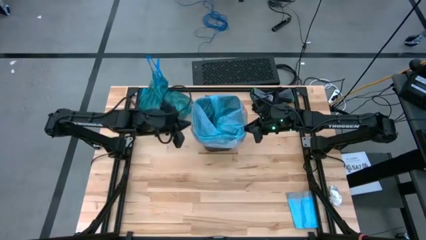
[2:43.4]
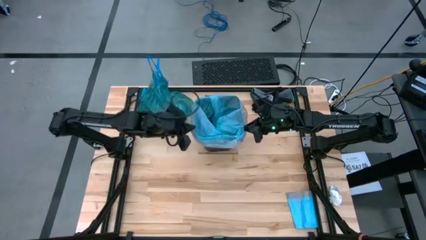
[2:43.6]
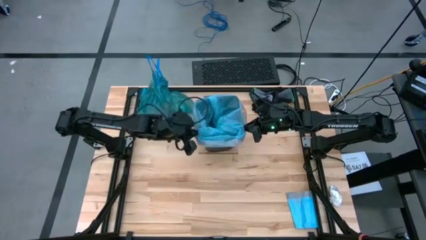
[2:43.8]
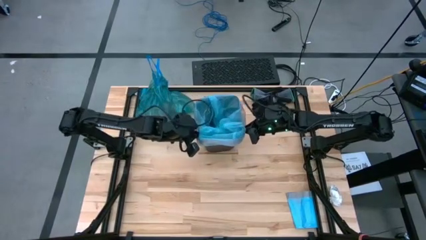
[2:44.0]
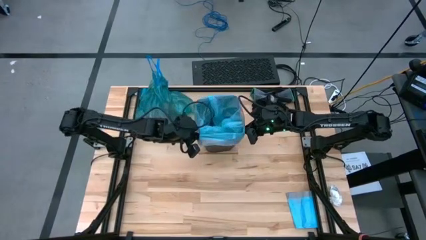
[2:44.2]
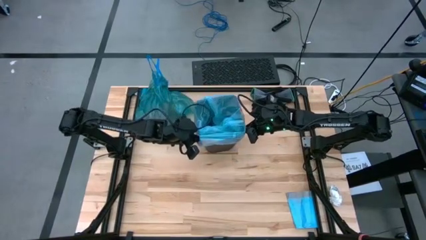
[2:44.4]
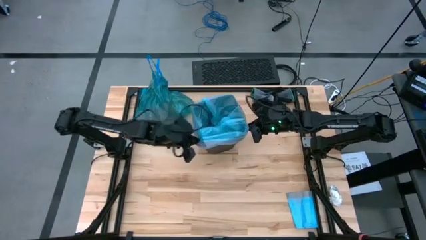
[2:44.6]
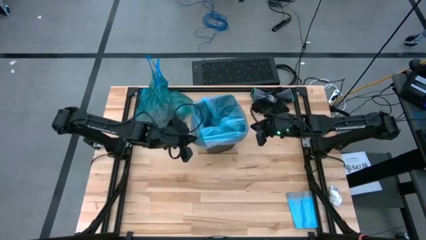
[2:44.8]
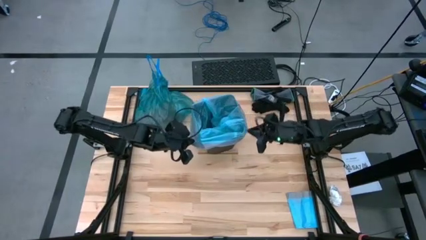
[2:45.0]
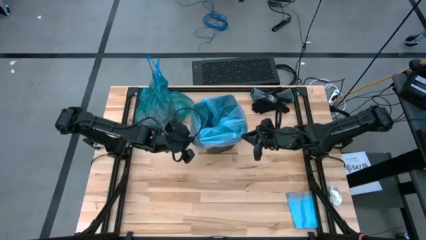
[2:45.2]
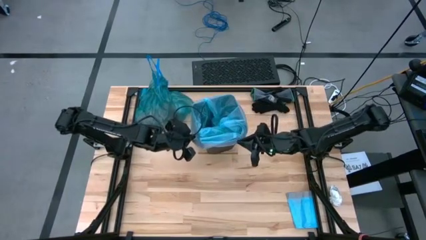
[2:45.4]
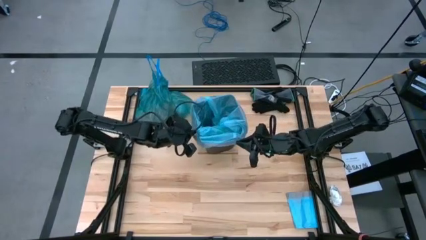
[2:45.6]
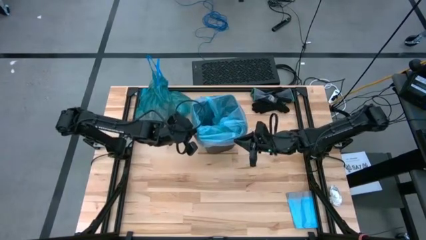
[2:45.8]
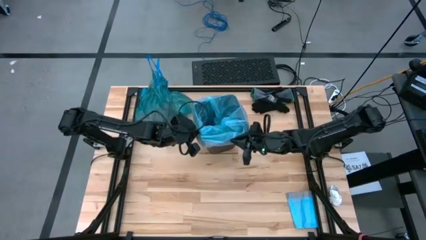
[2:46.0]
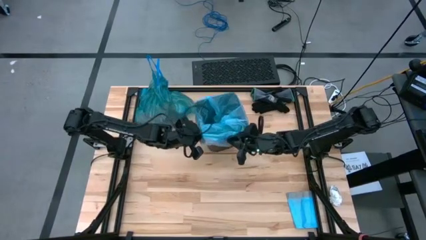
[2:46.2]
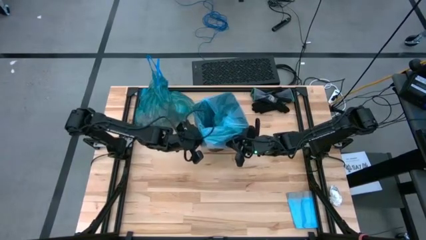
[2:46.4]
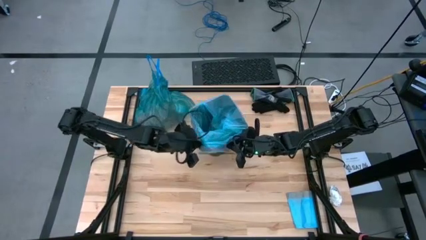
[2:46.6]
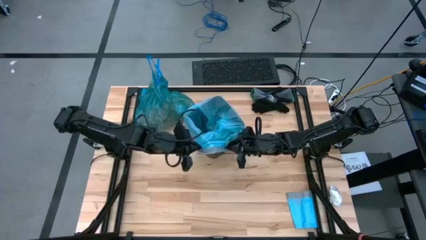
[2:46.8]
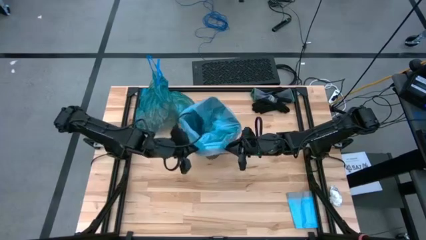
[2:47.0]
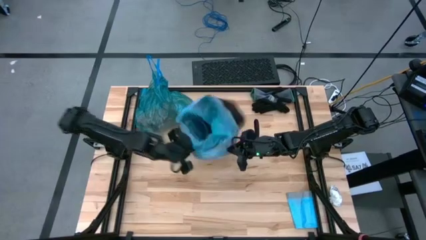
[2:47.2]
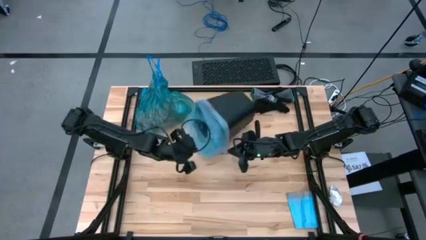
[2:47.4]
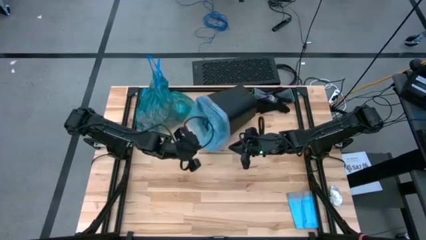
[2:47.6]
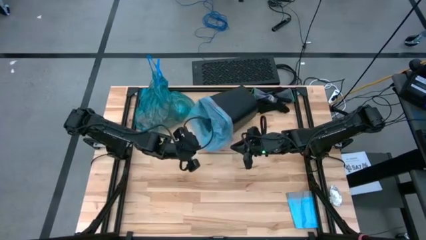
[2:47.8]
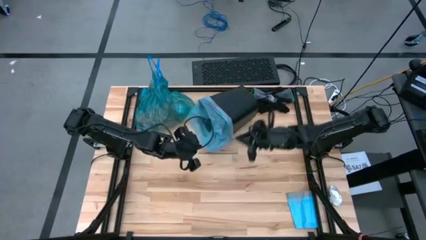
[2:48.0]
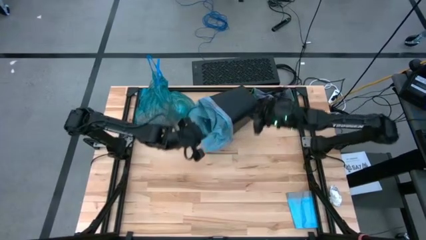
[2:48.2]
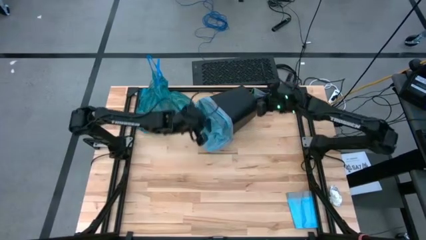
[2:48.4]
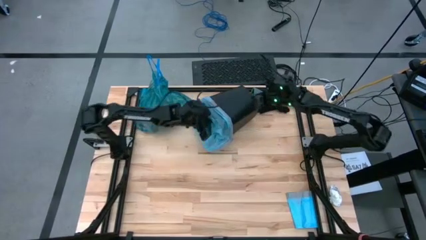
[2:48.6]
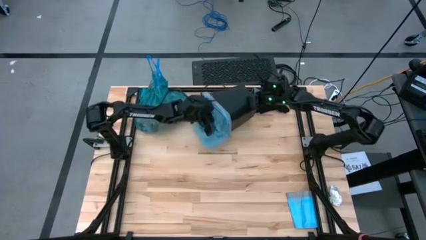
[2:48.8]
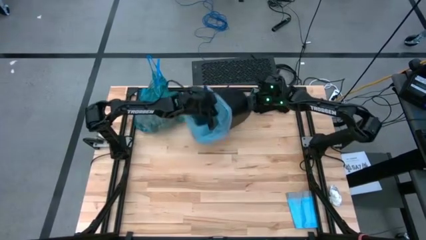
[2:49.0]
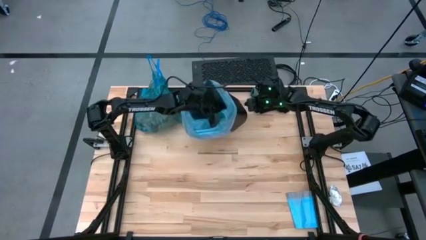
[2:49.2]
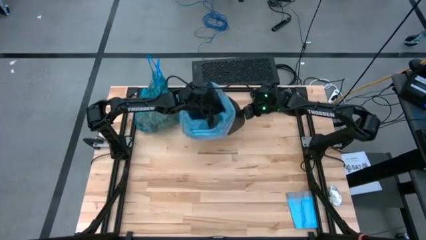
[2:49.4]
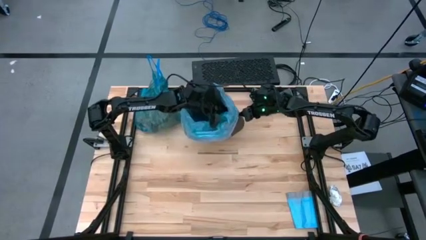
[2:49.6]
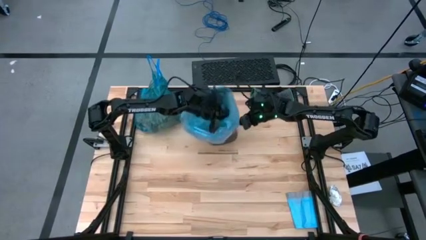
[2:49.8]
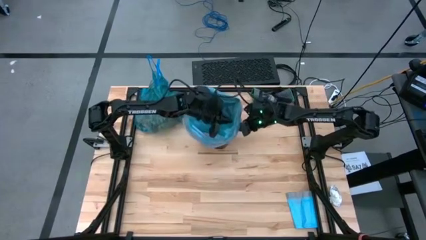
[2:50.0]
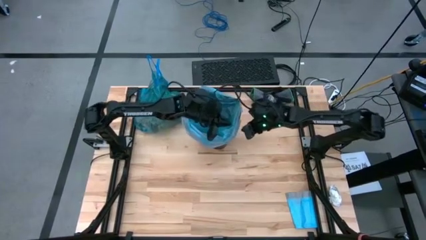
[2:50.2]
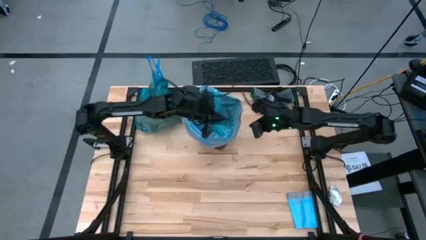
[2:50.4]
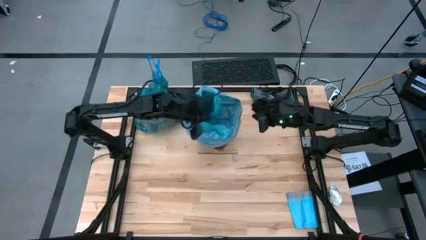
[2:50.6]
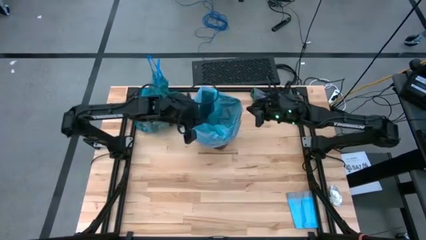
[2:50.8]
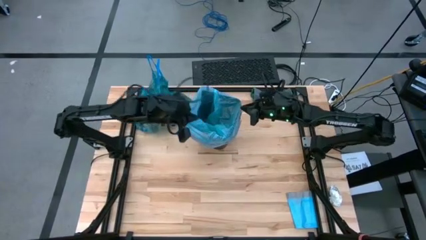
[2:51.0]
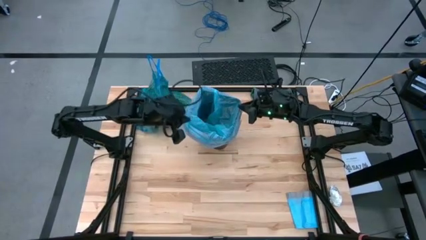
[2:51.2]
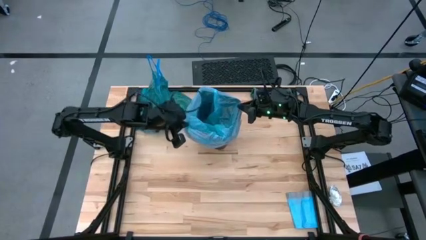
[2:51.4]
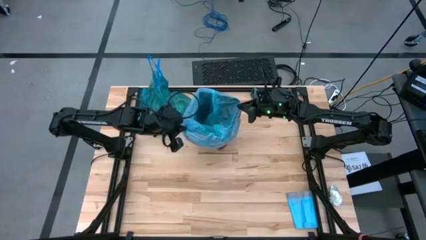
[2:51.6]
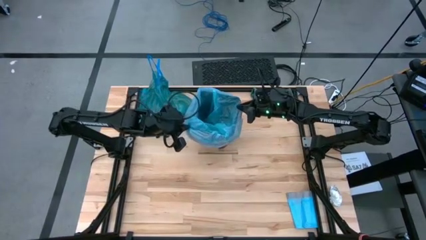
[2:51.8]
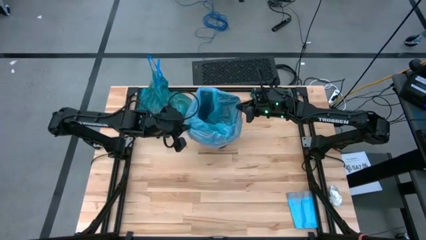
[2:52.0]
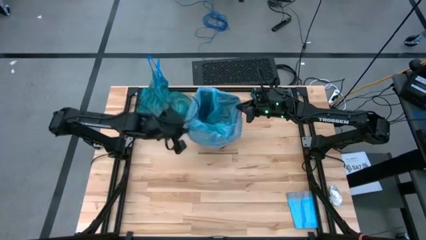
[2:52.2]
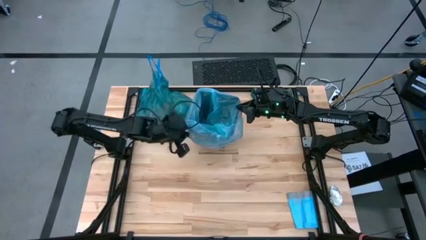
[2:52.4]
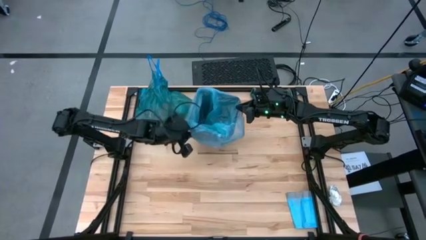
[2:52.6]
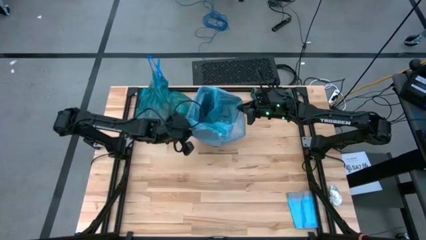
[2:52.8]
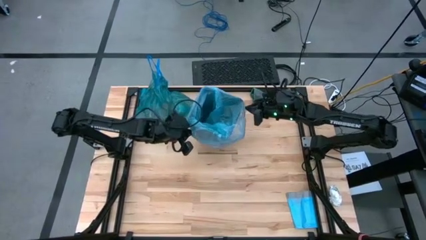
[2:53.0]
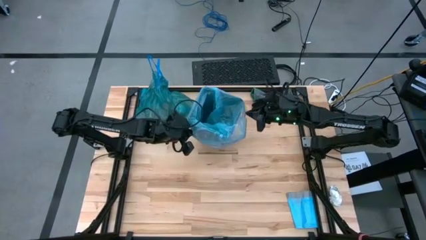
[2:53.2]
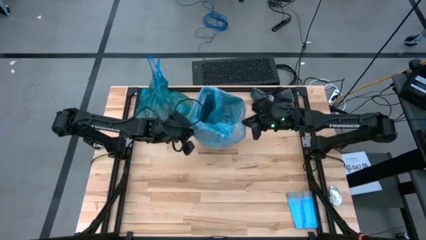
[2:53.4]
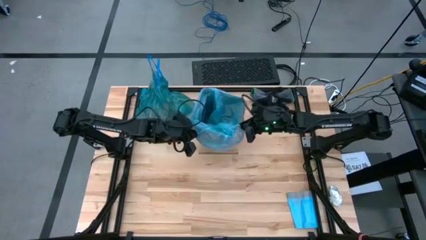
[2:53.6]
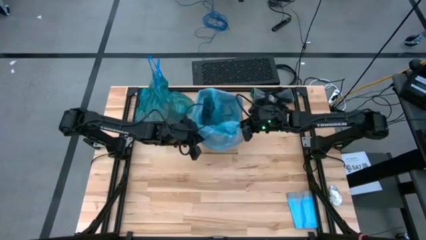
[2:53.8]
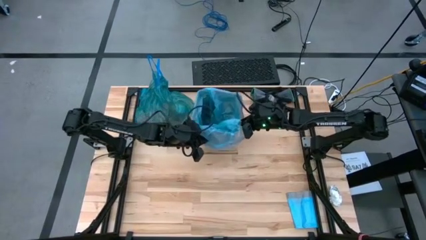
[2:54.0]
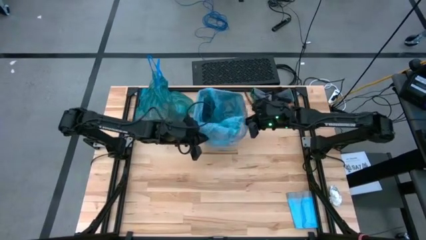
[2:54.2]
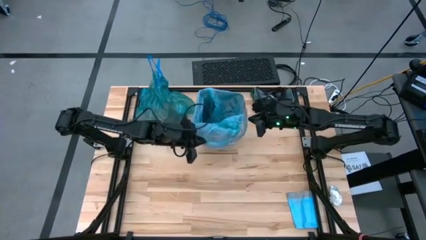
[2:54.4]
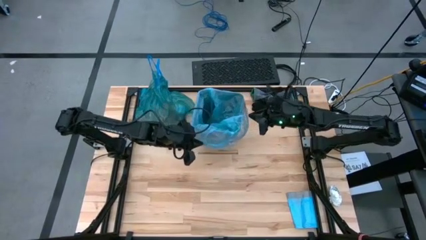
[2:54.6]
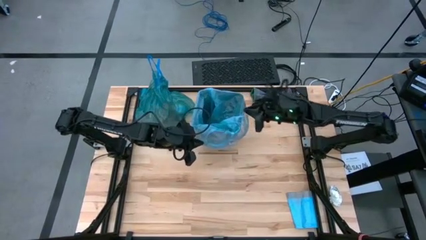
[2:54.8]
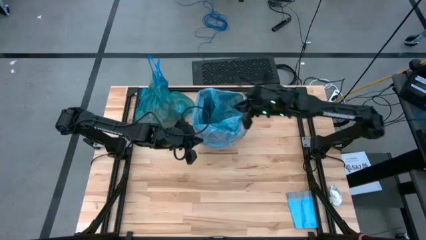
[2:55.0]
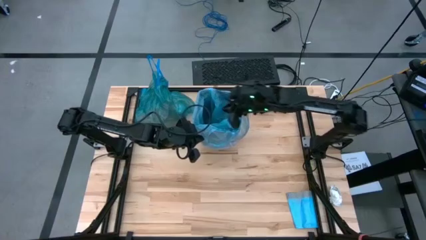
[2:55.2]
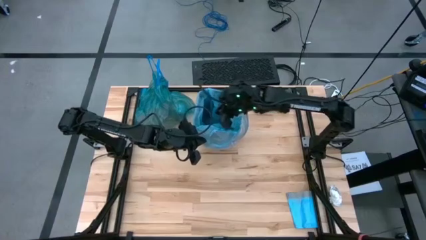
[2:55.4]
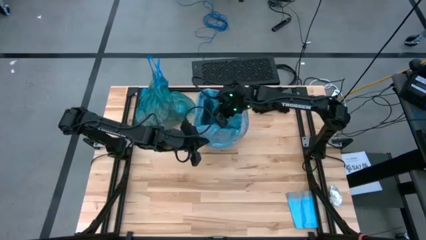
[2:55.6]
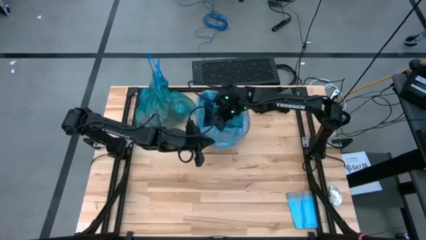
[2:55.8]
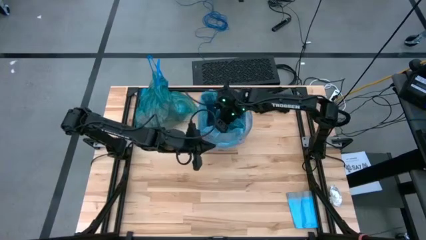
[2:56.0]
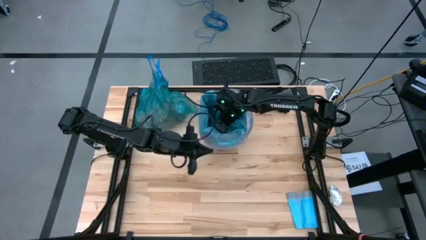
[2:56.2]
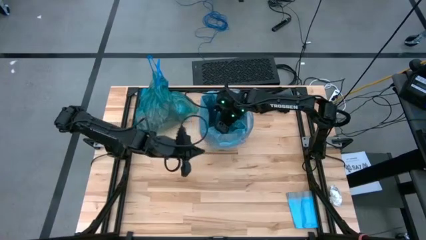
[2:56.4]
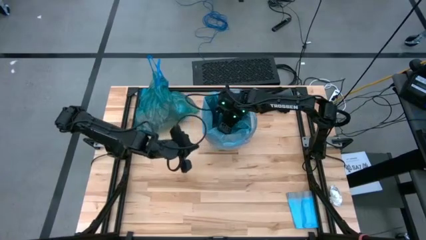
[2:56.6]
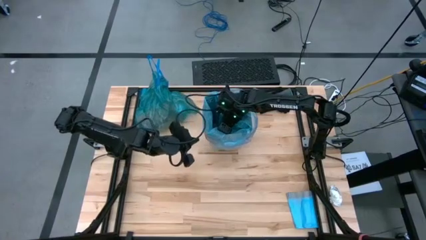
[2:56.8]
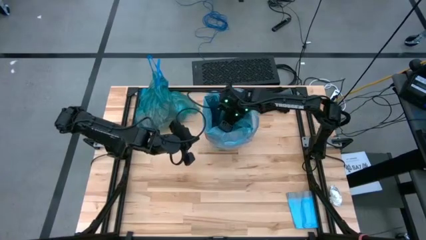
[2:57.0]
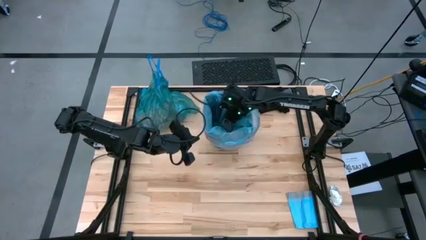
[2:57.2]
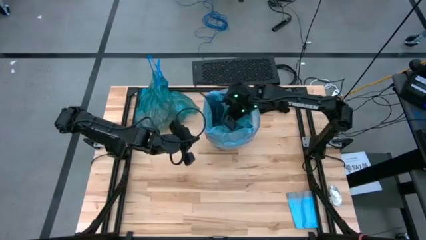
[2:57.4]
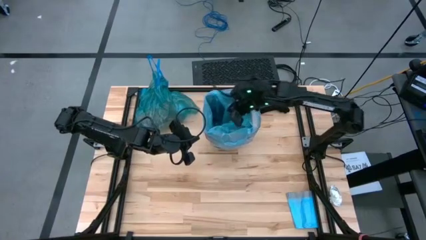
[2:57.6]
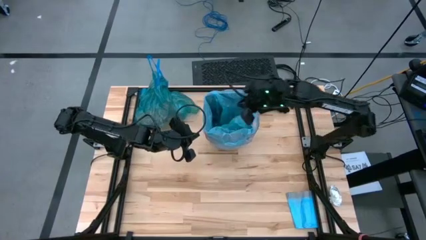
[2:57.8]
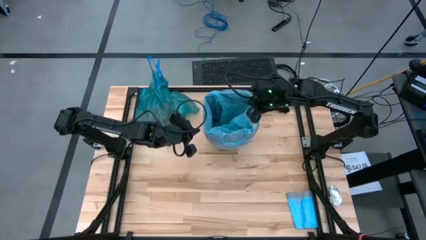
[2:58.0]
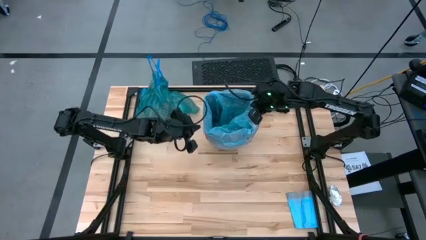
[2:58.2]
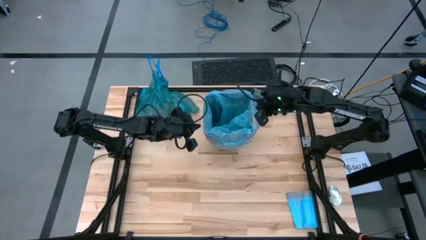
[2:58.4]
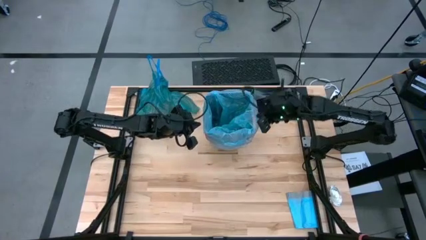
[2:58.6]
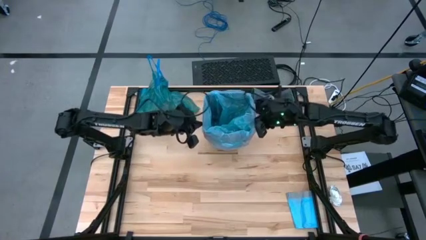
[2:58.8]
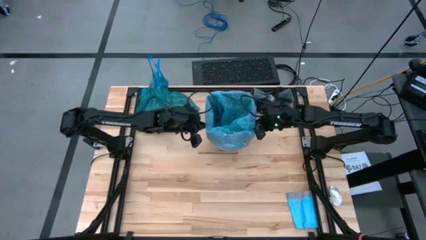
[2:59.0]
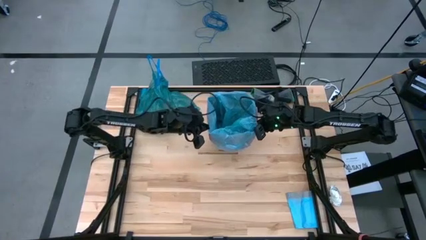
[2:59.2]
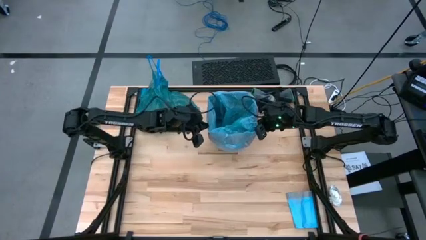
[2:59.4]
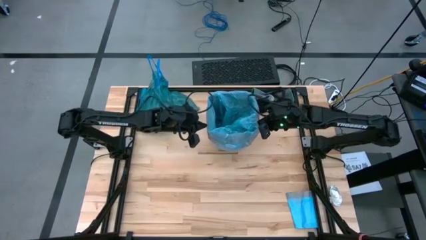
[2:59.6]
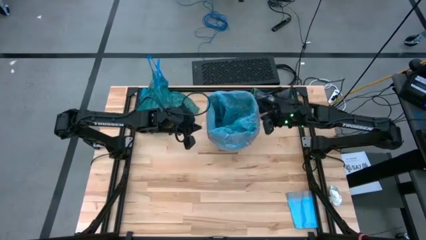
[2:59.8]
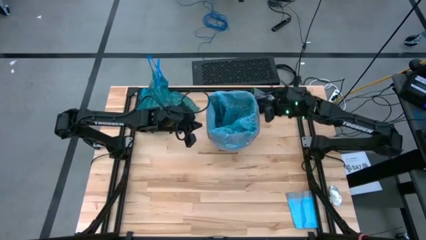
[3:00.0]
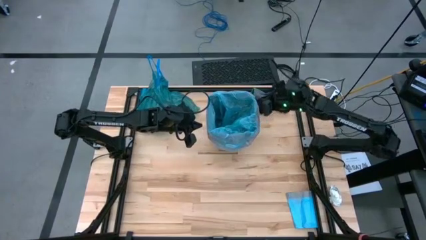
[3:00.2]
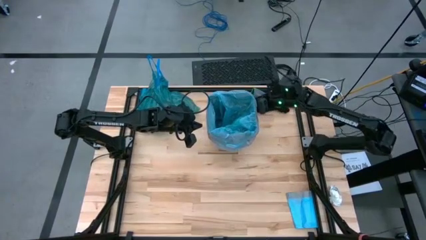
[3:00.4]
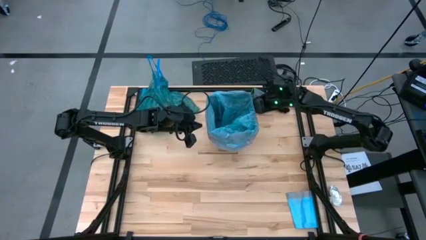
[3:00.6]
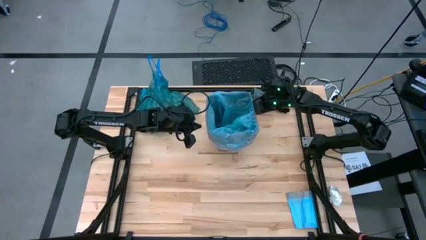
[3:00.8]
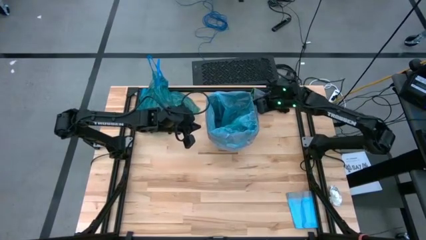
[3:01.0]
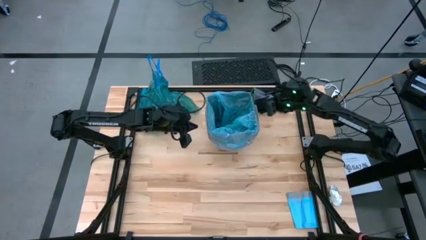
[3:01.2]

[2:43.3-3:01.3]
Task: place trash/remove bag and relplace
Put the new blue trash bag in the black trash bin
